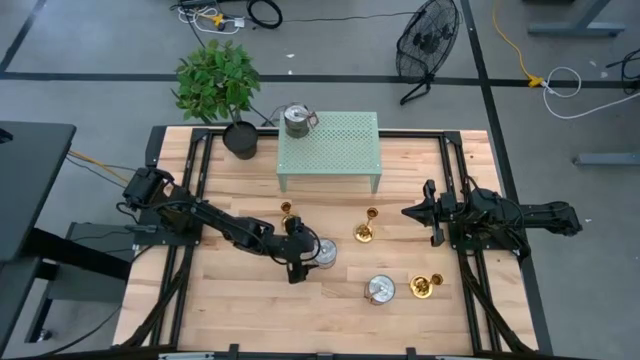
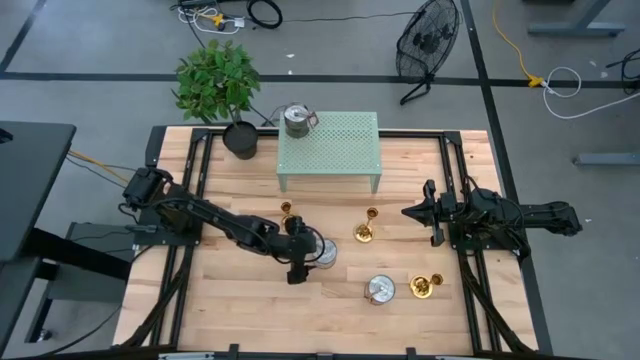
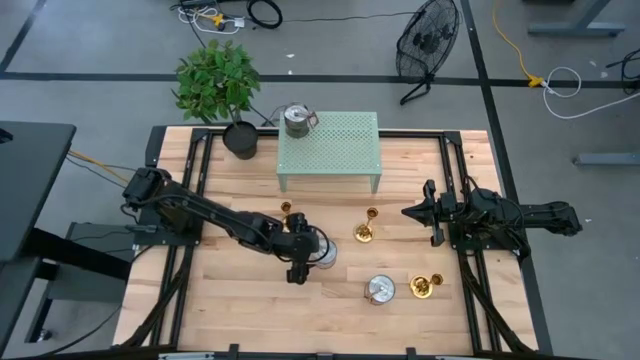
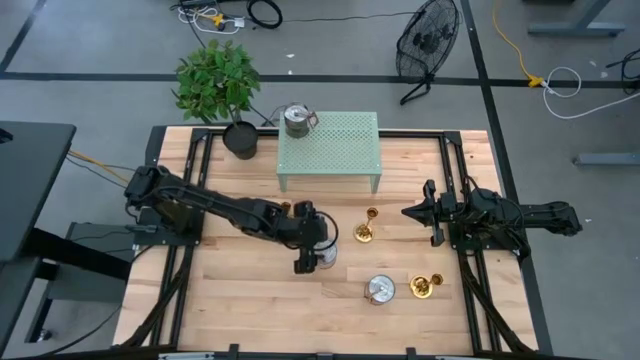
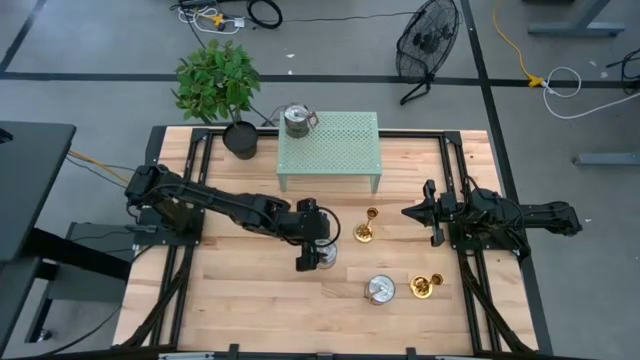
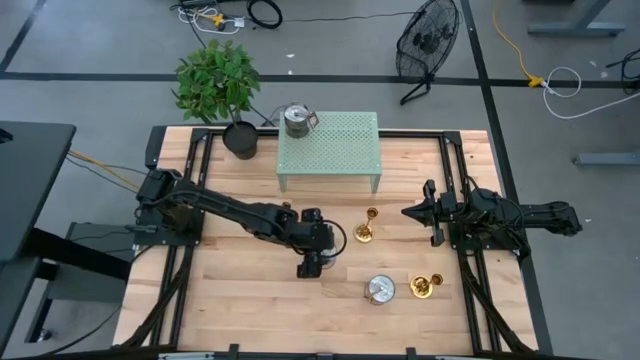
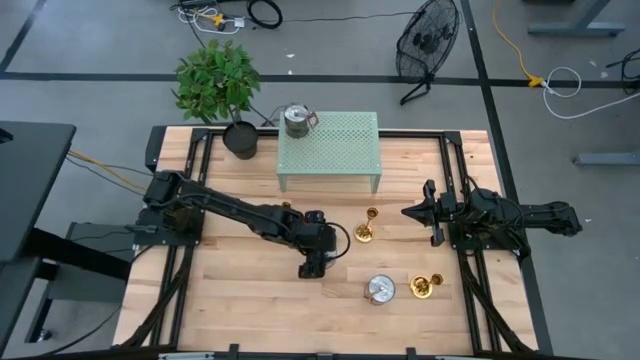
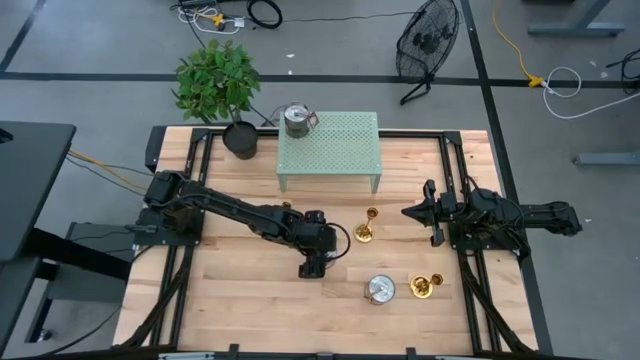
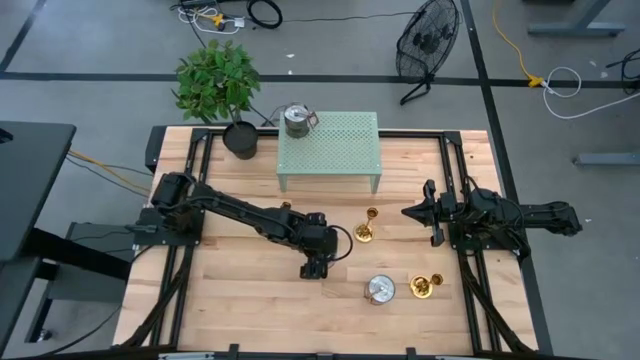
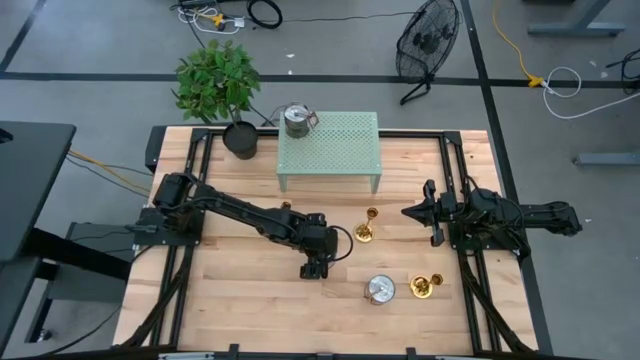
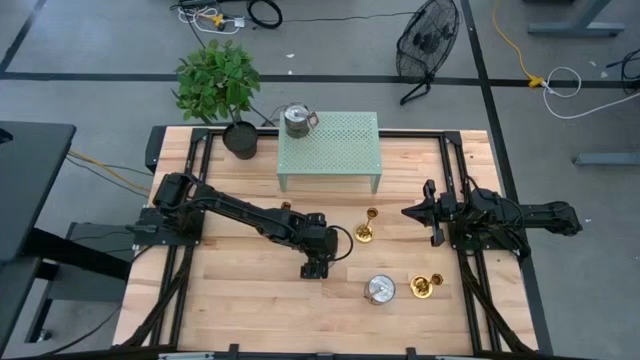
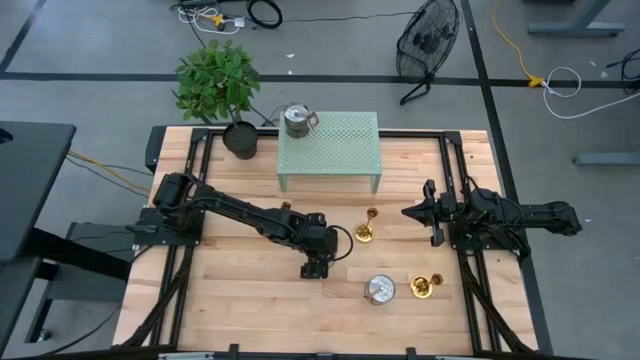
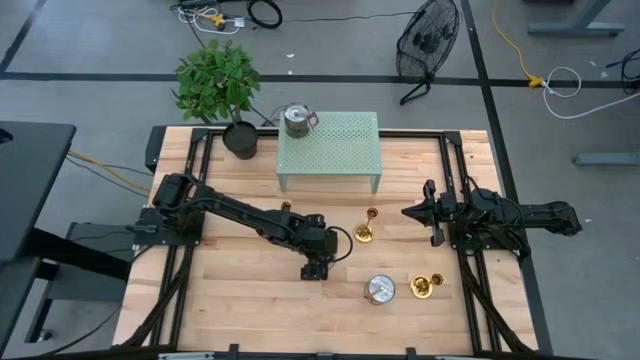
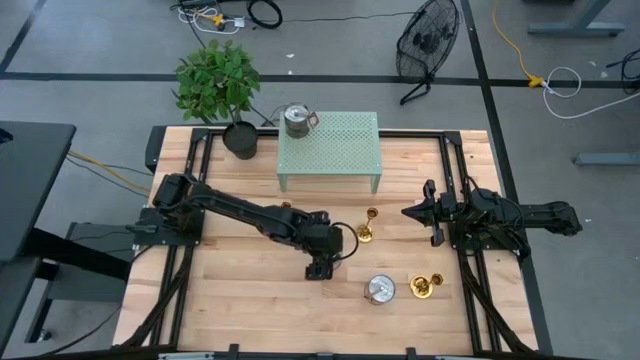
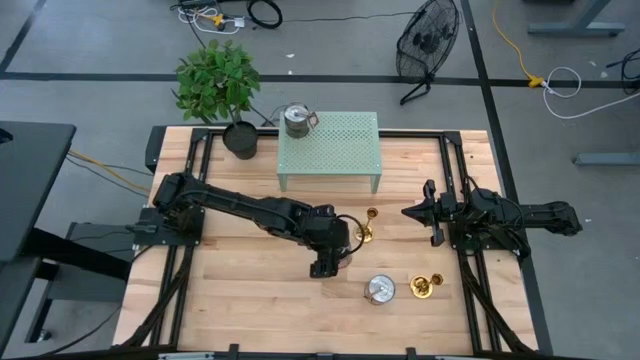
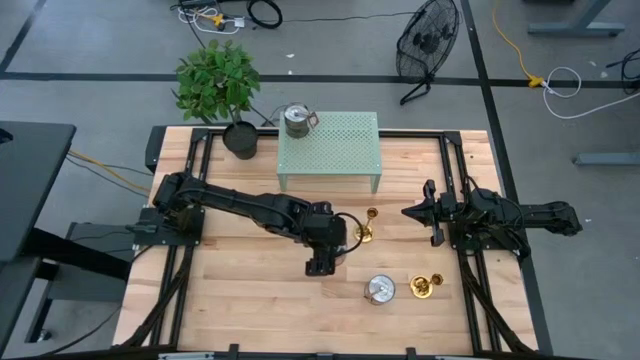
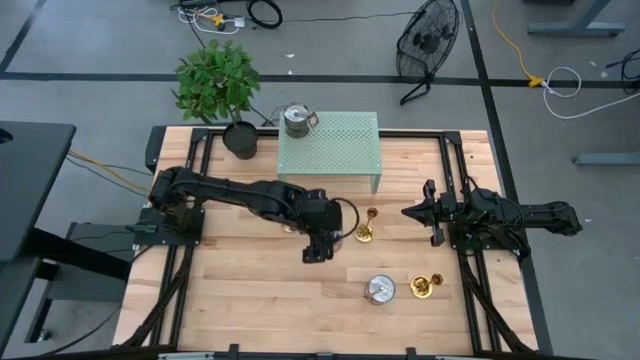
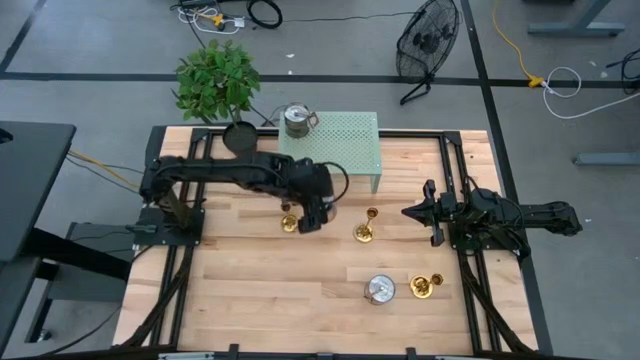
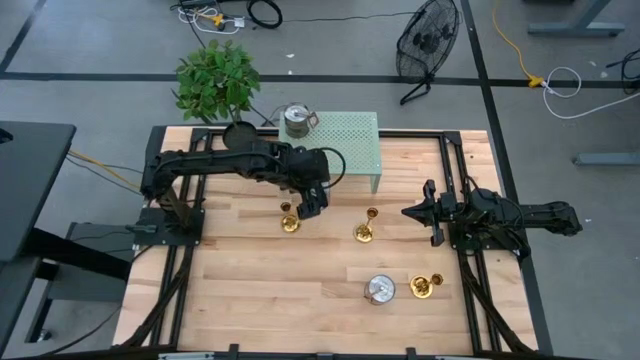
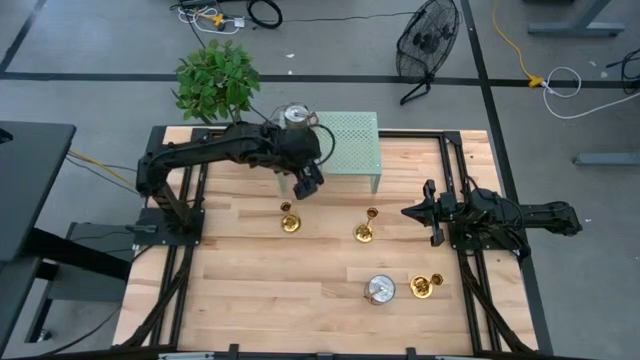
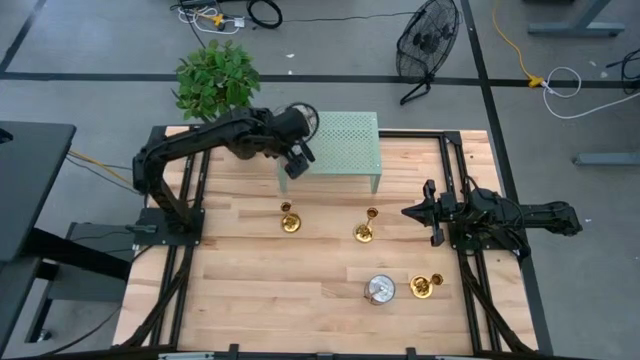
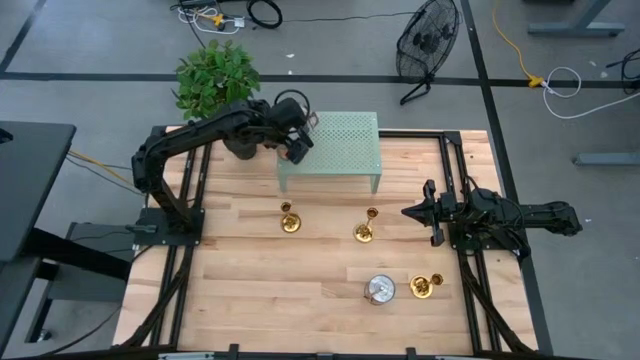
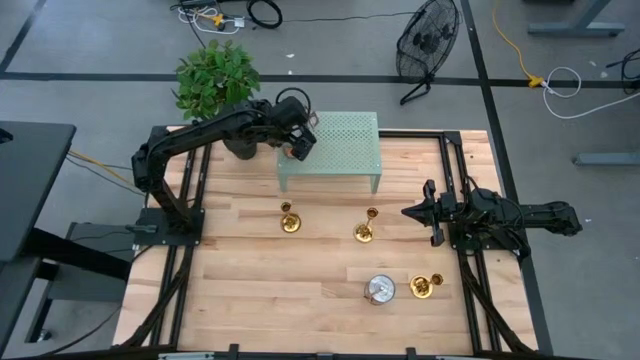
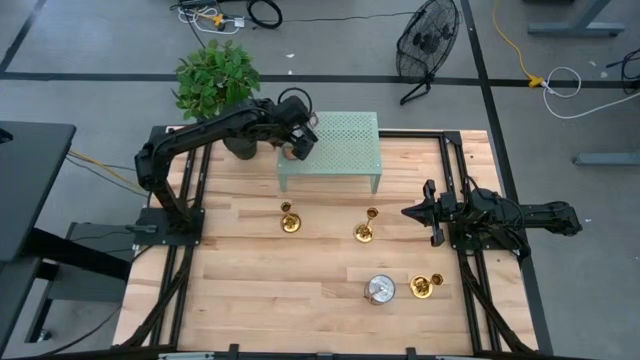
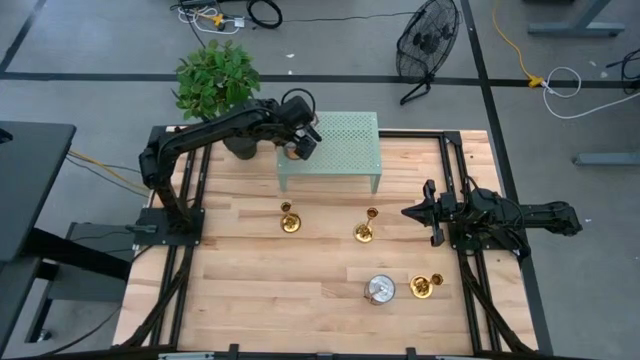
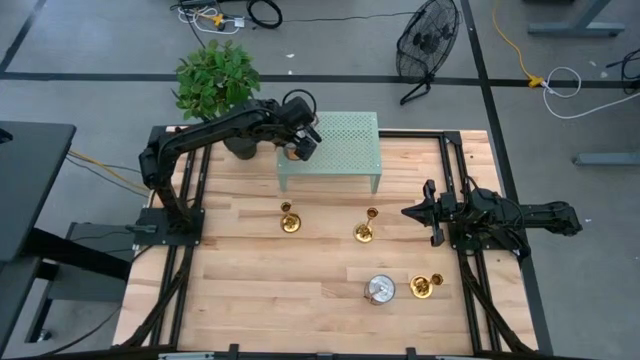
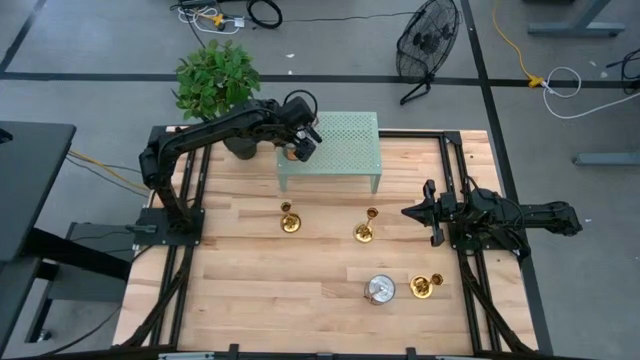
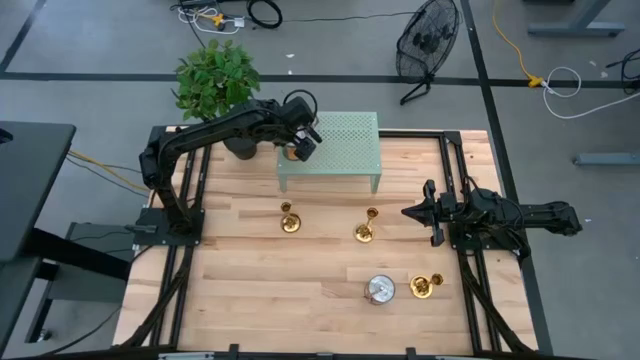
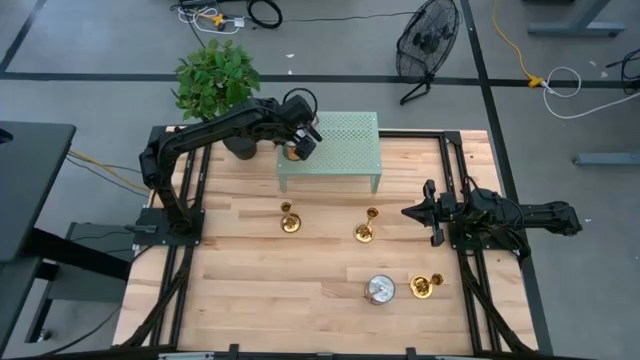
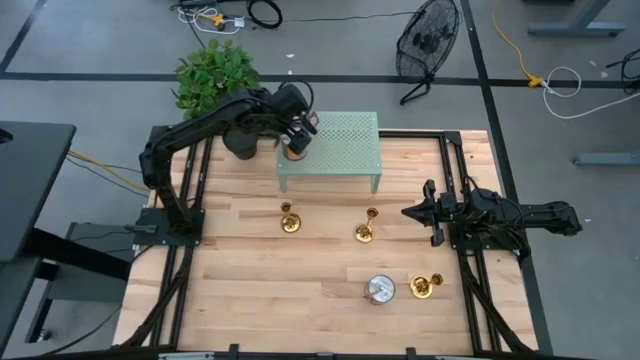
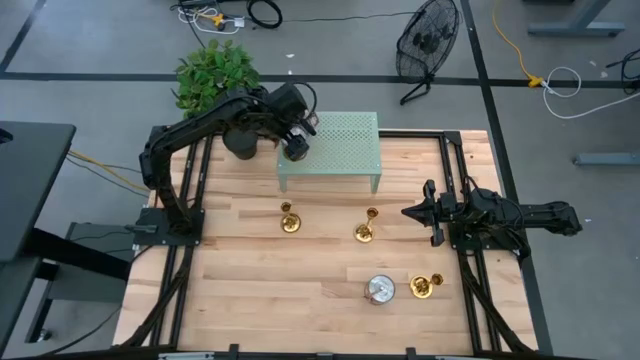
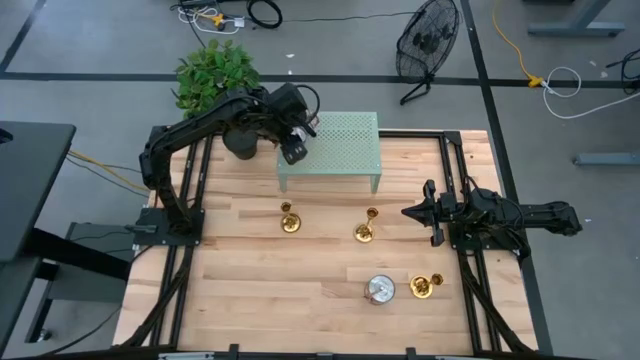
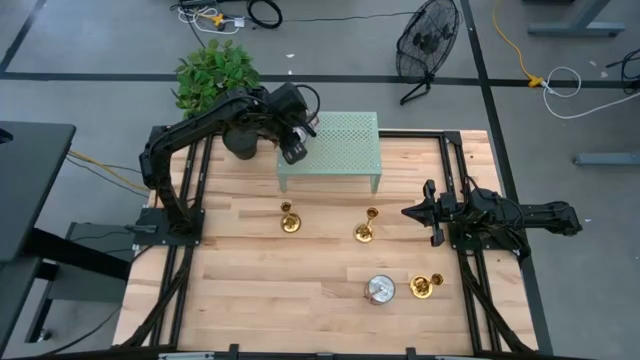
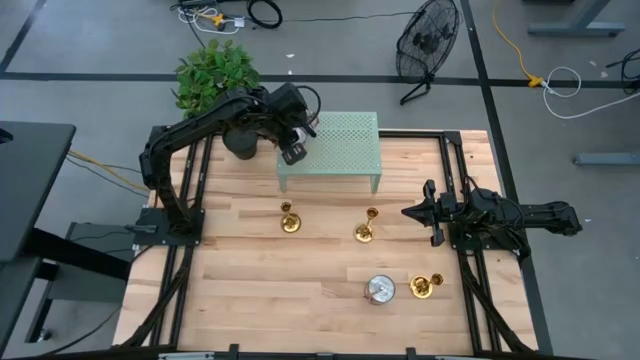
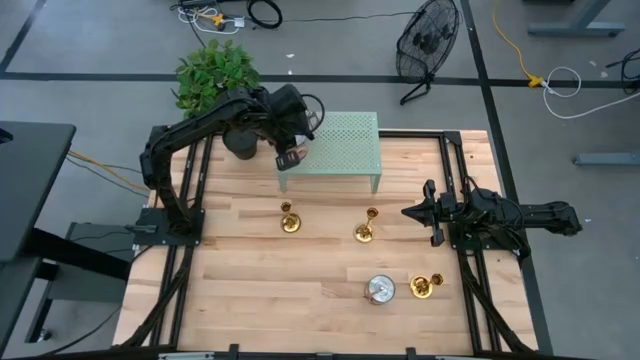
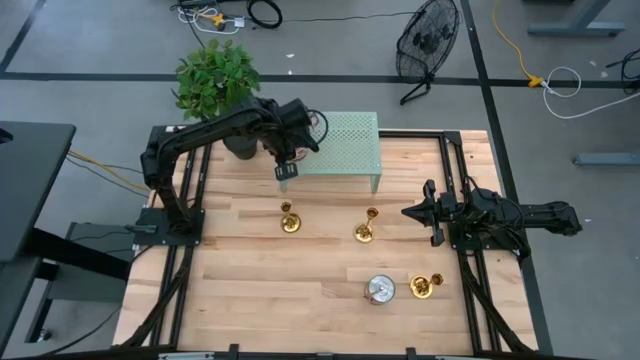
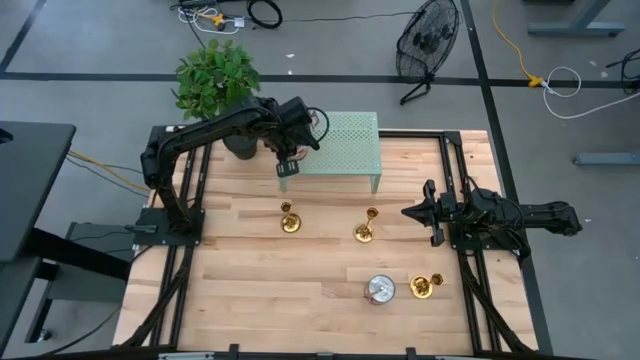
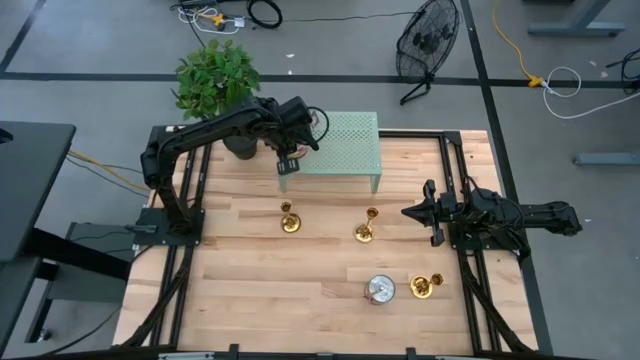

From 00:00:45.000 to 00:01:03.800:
Task: Pick & Place candle stick holders
Put the top silver scented candle on the shelf

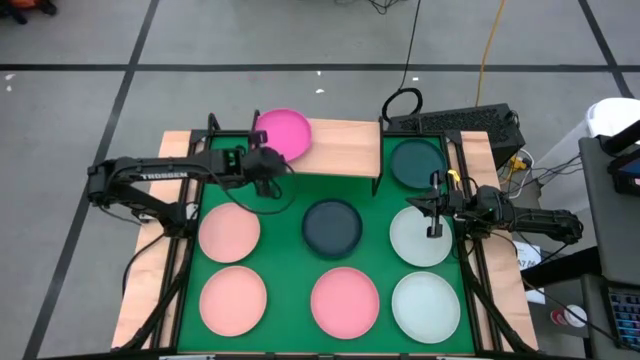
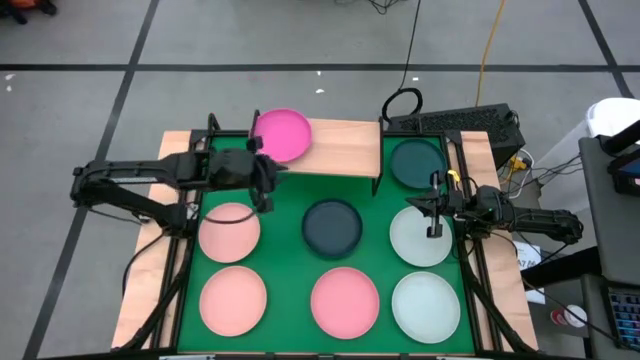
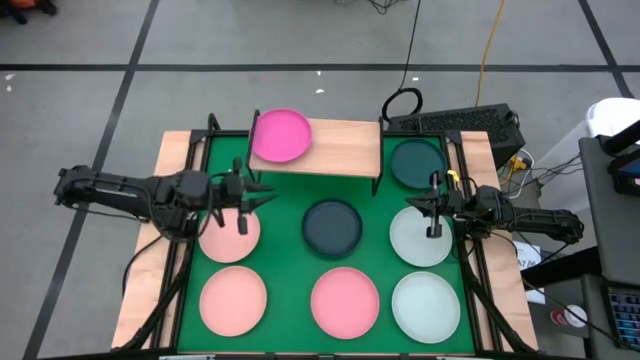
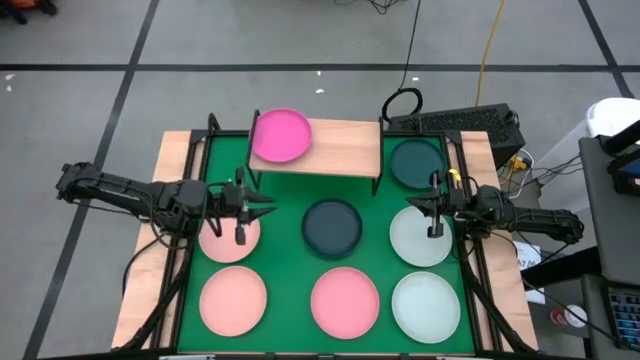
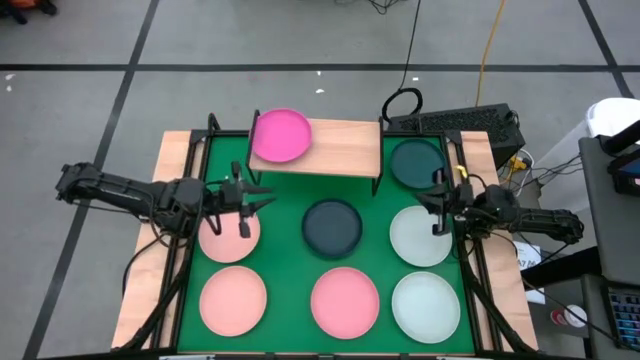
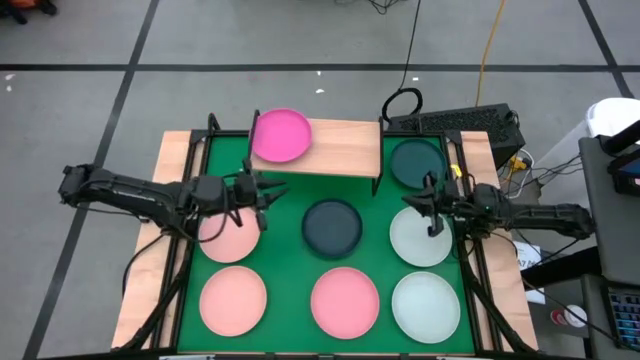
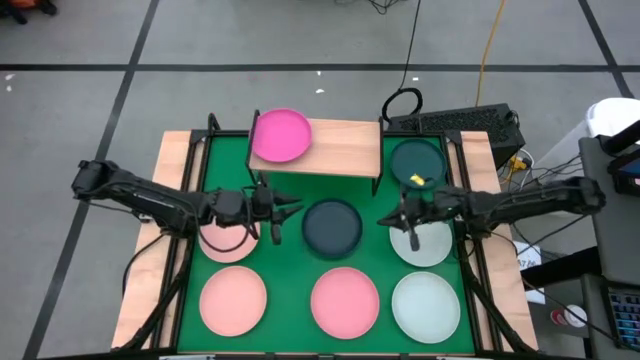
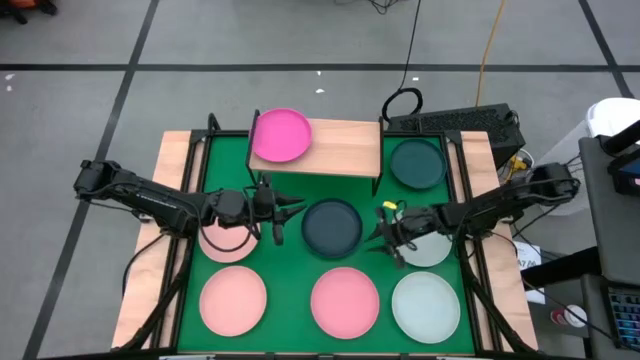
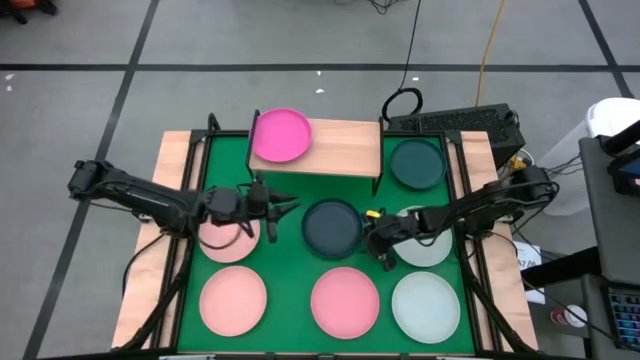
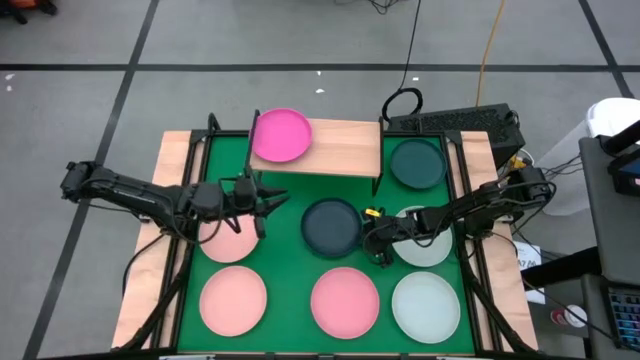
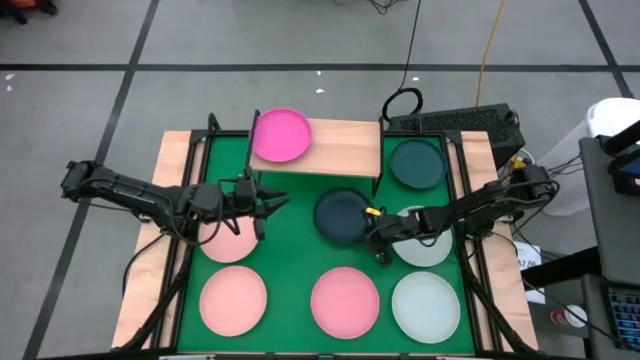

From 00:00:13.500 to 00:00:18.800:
Task: Place and stack plates onto a shelf
Stack the black plate on top of the pink plate on the shelf
